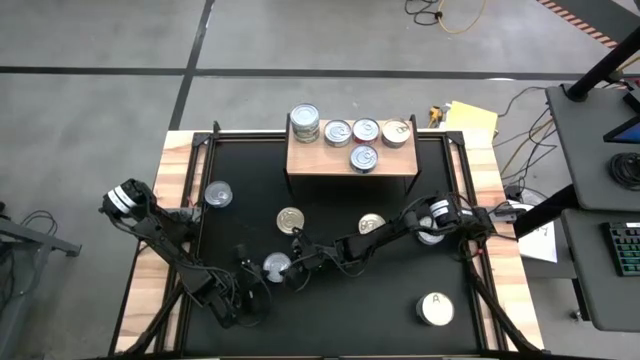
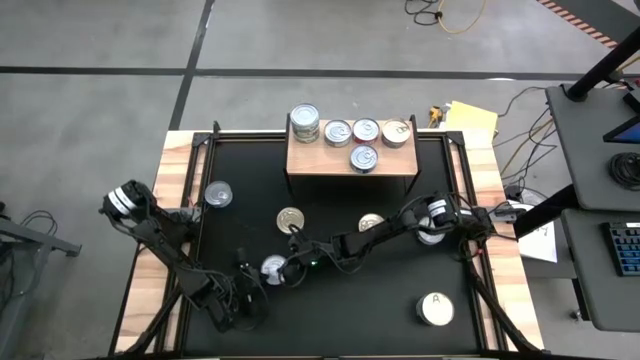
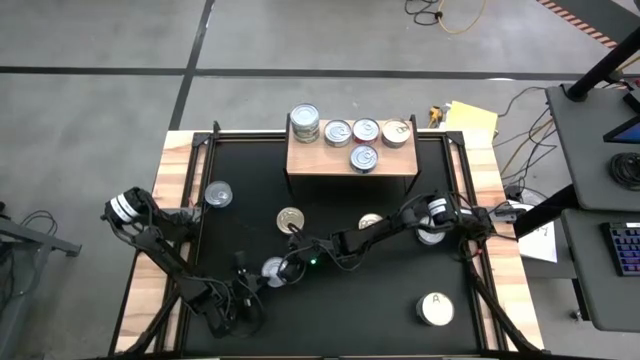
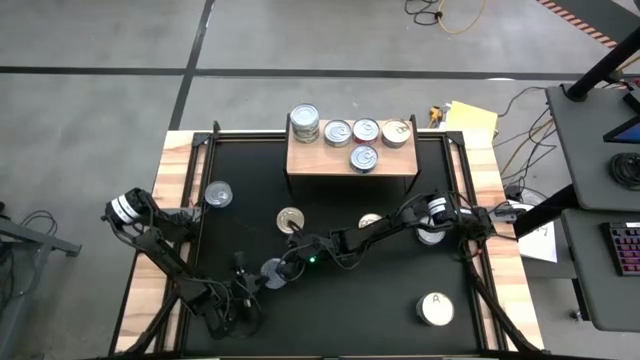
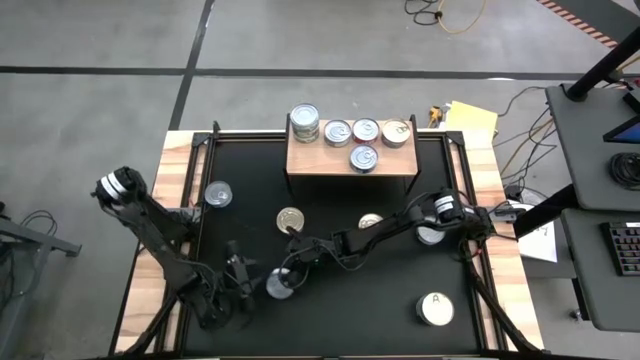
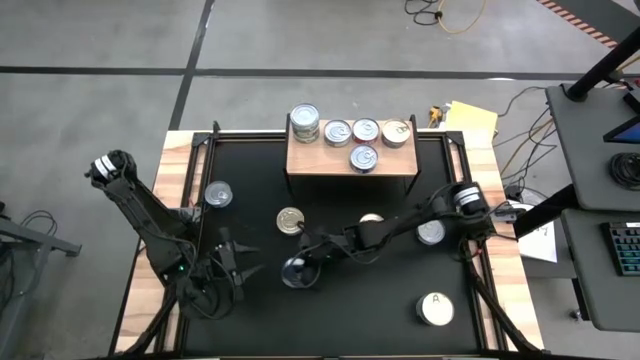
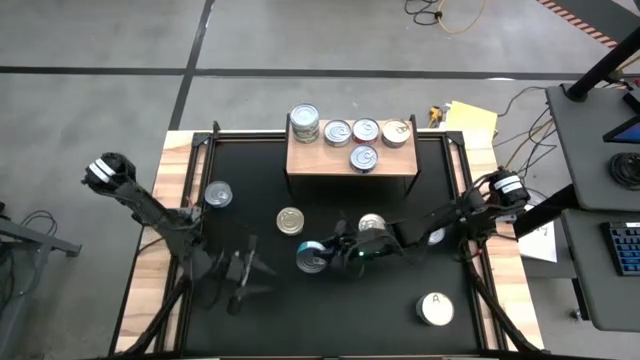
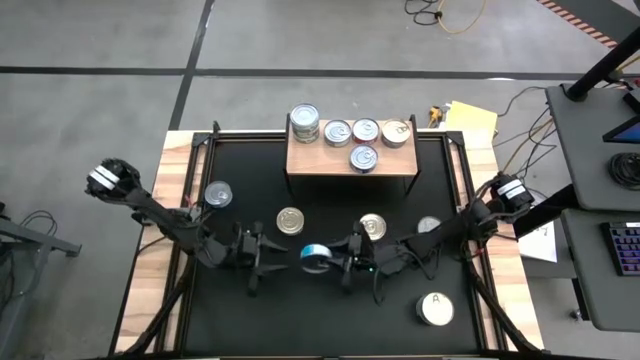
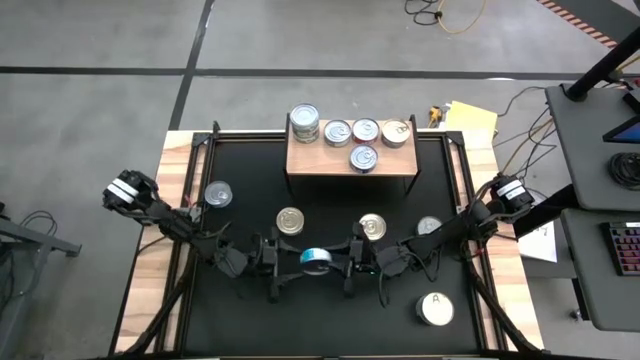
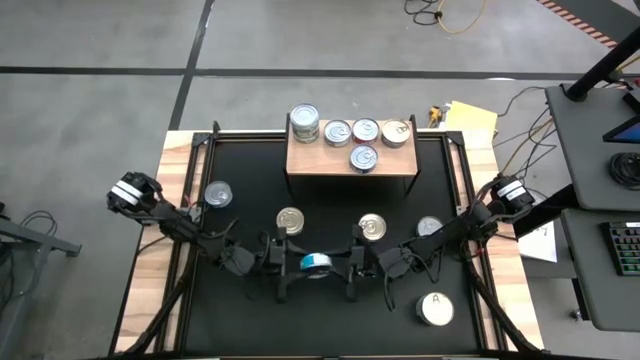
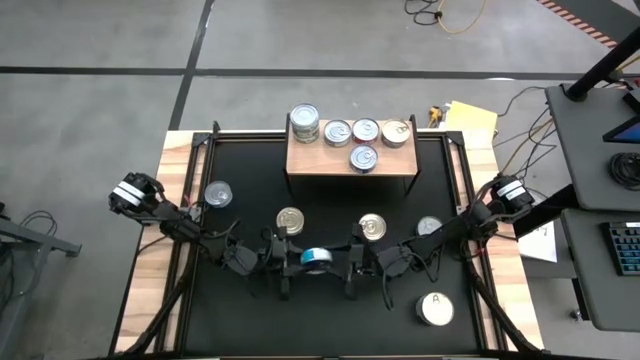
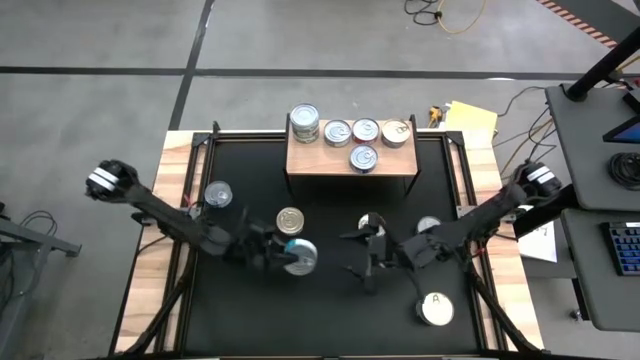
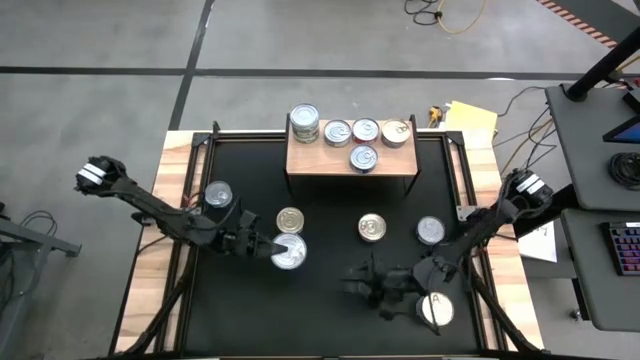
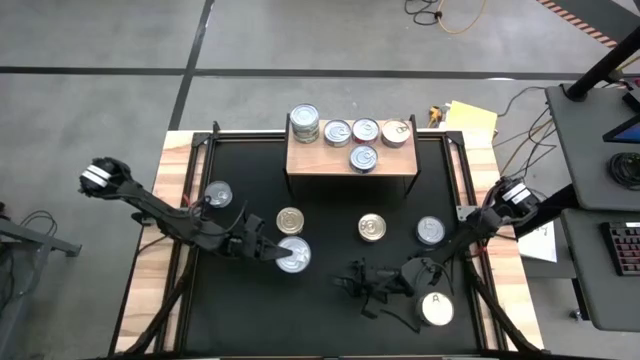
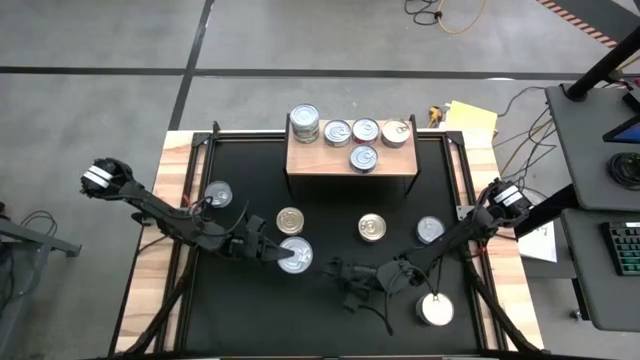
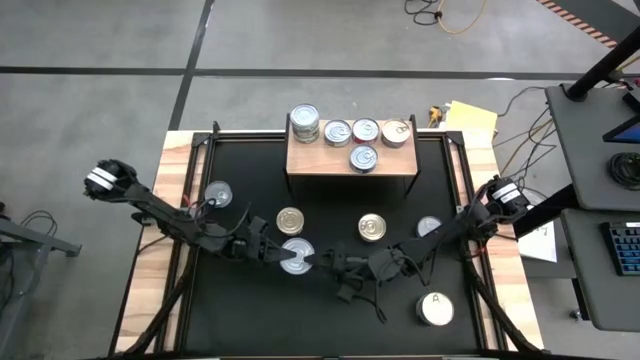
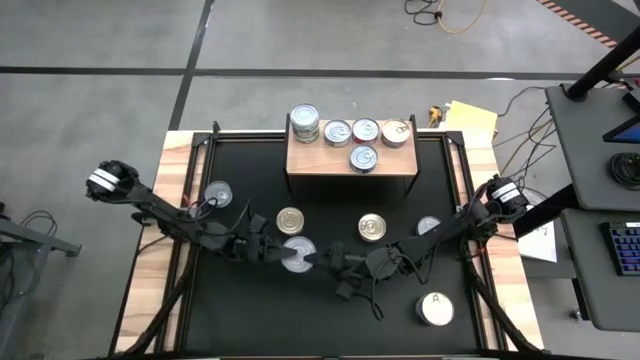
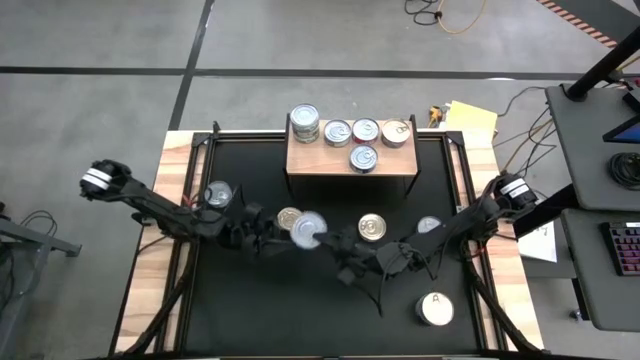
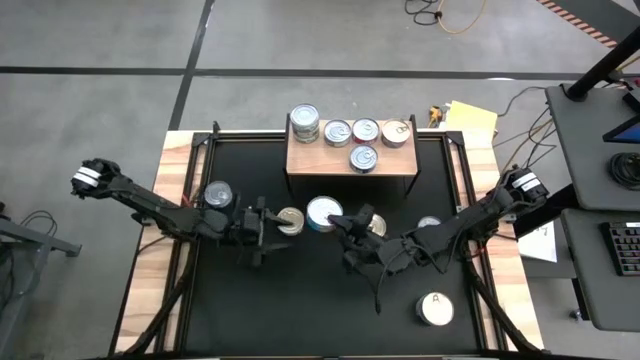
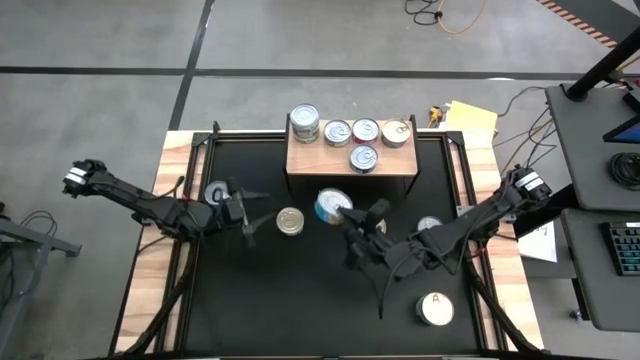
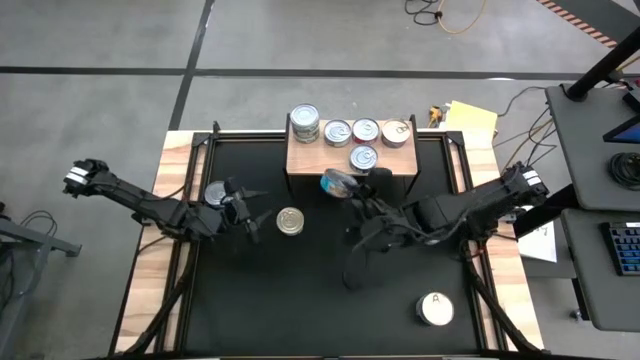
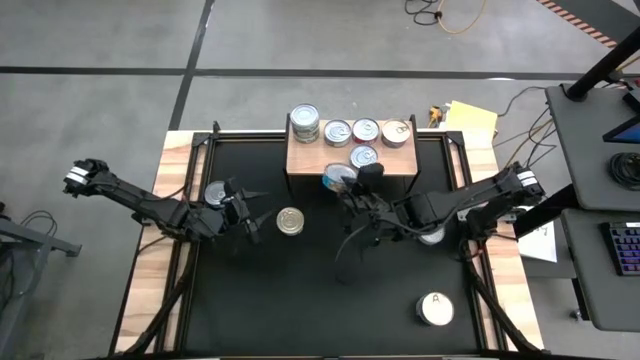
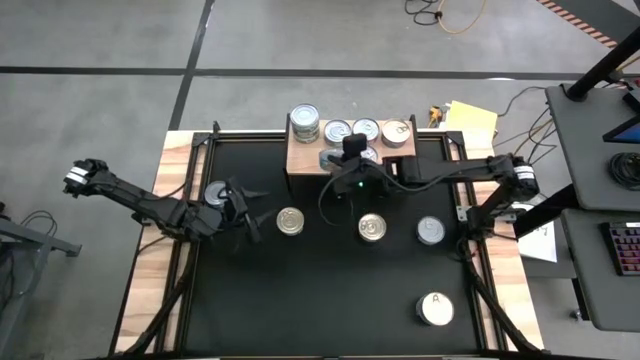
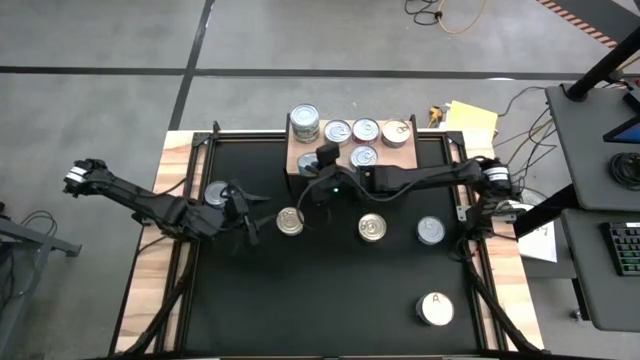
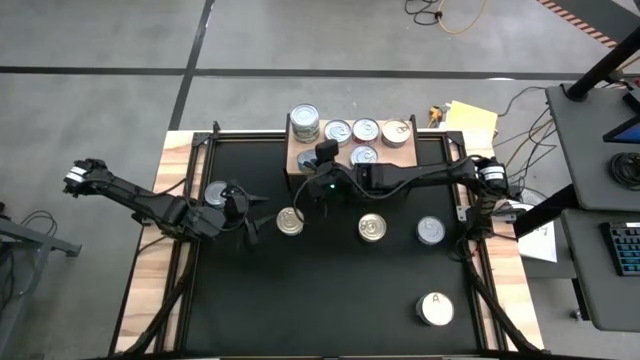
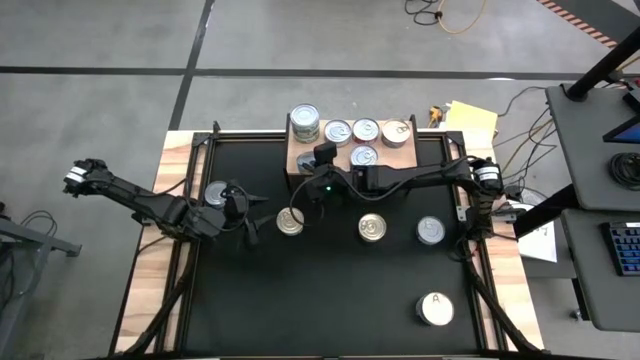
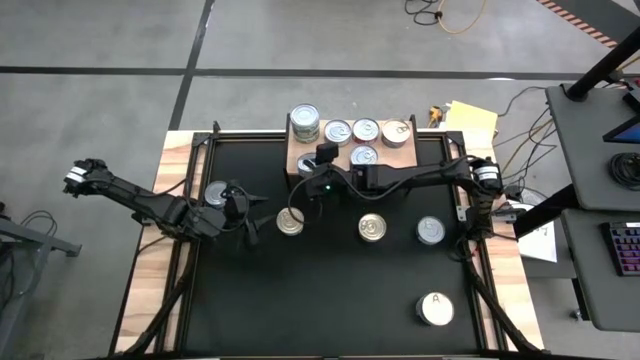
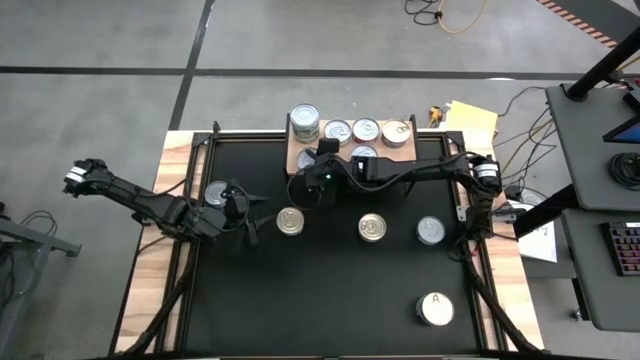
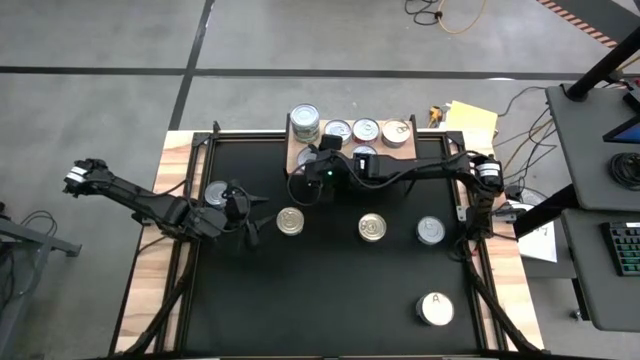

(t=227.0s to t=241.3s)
Task: Stack canned seafood by type on shelf
Put the yellow tuna can on the shelf

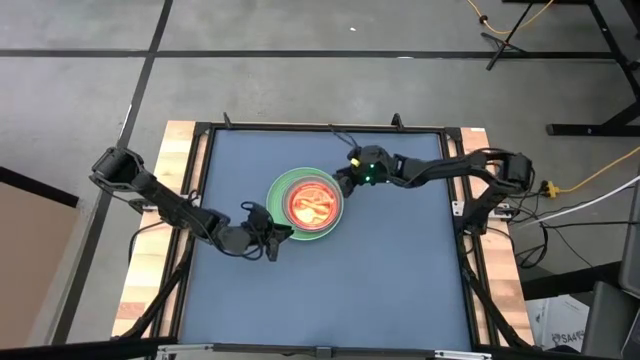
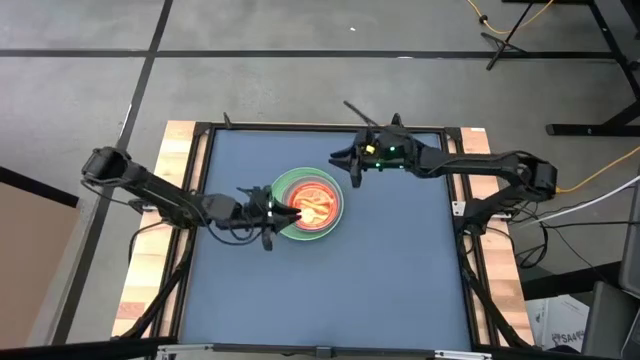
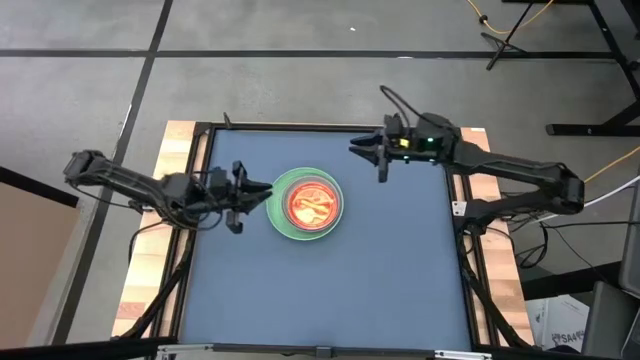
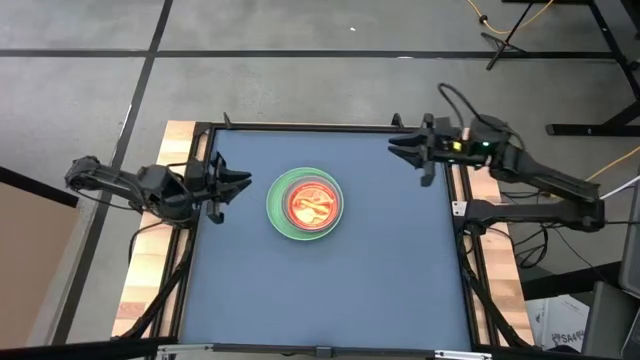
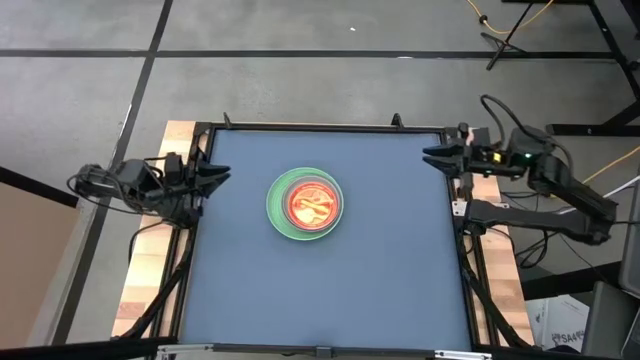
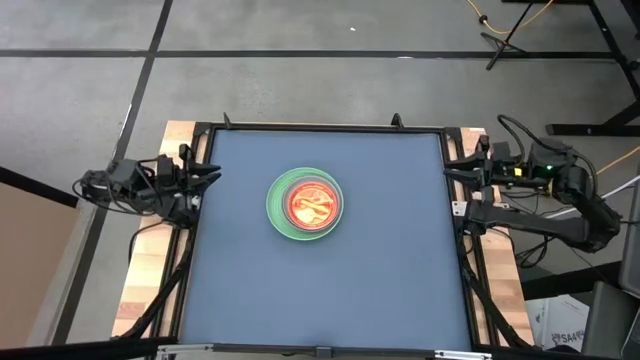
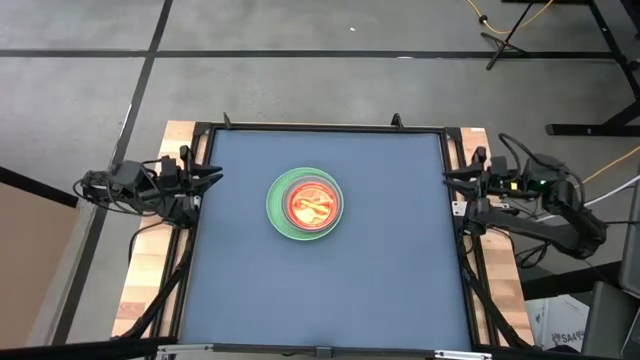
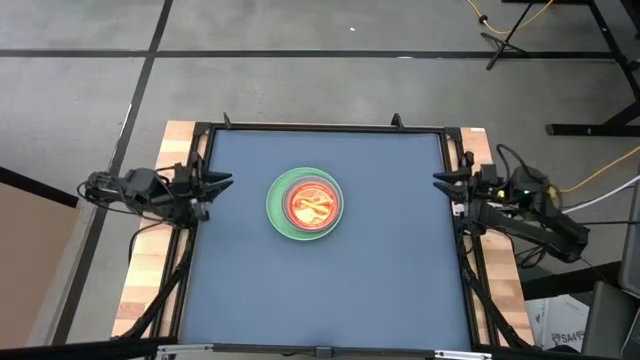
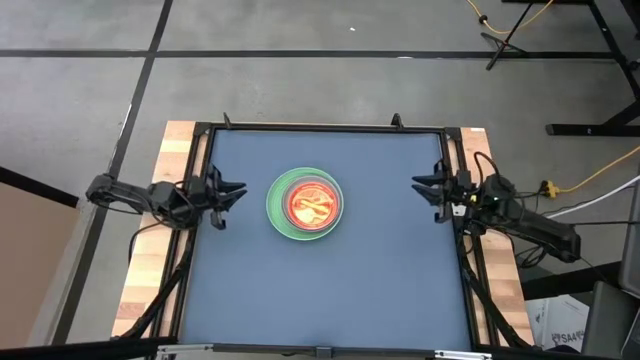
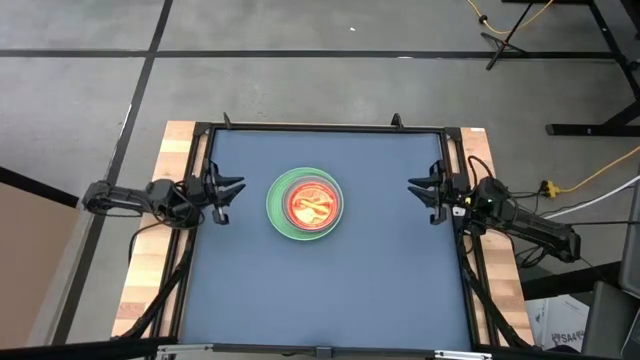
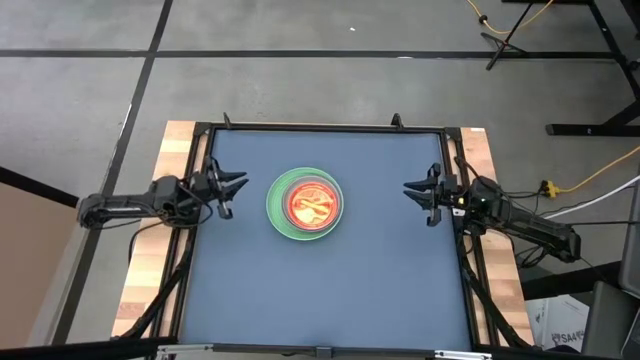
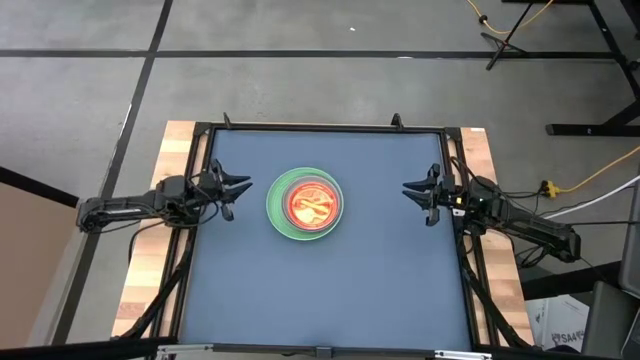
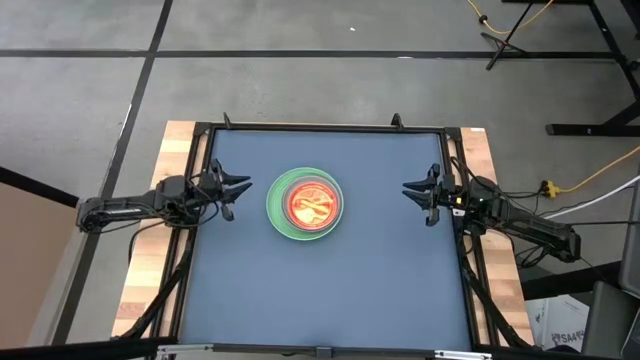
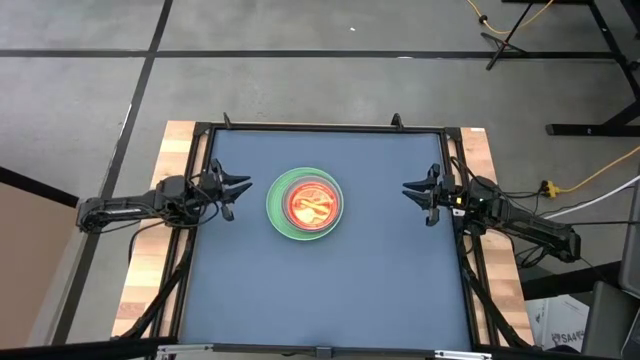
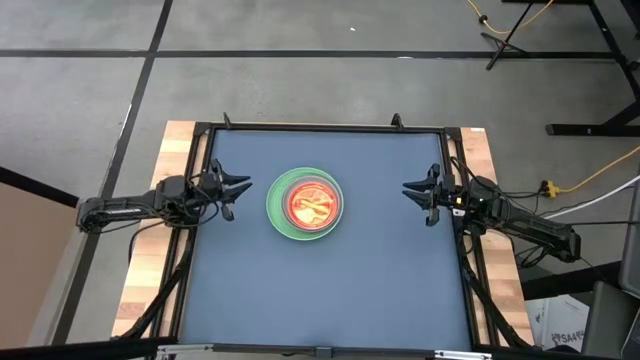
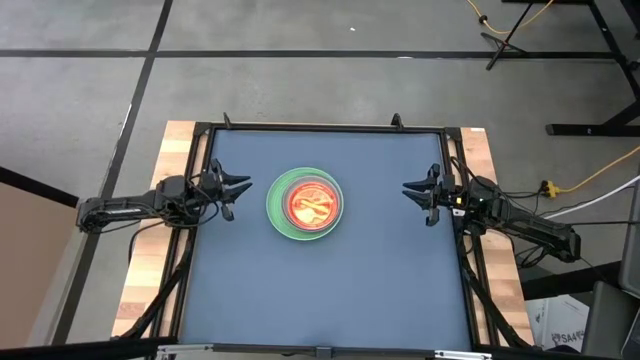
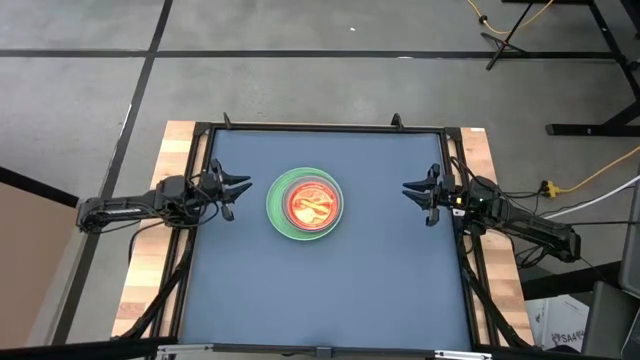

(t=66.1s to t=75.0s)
Task: Stack plastic plates
Return to Home Position
